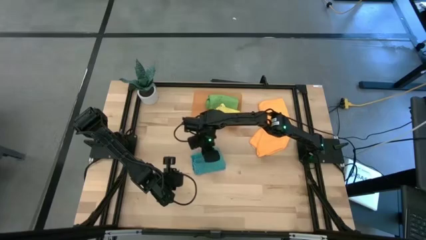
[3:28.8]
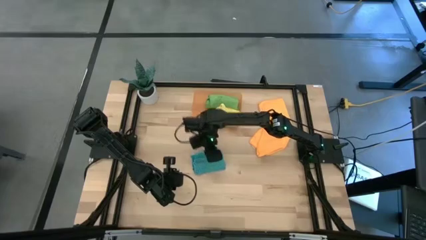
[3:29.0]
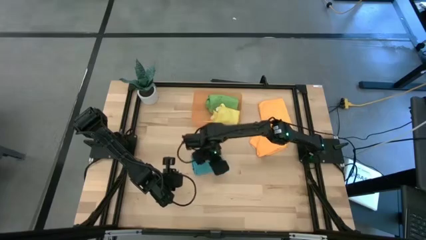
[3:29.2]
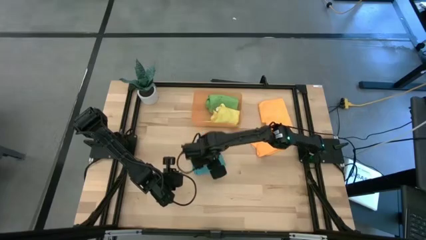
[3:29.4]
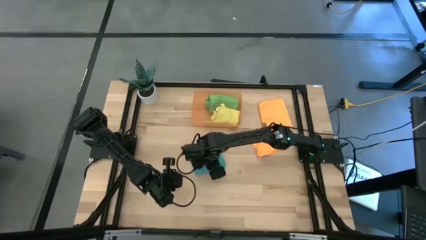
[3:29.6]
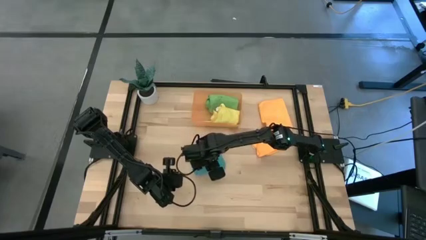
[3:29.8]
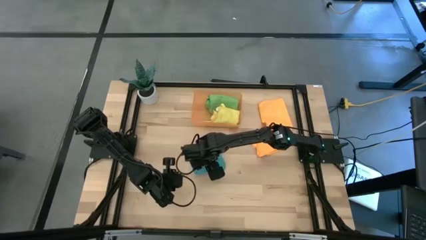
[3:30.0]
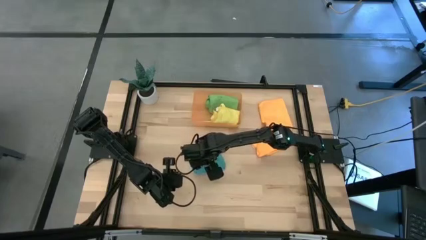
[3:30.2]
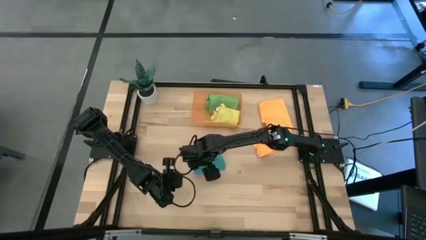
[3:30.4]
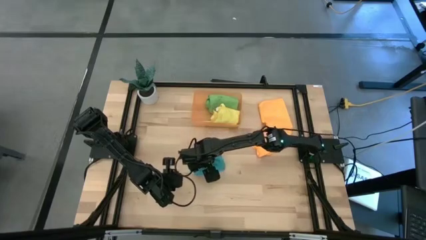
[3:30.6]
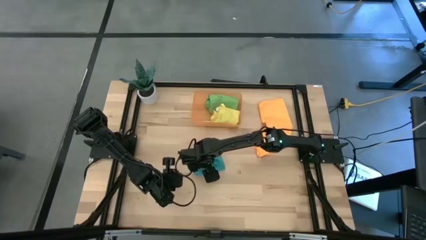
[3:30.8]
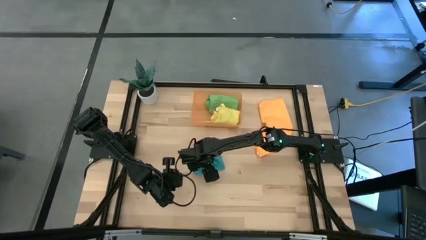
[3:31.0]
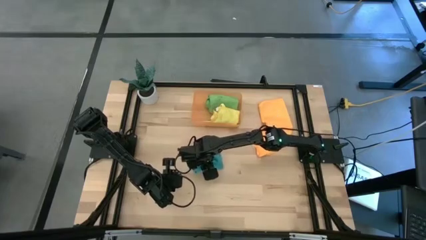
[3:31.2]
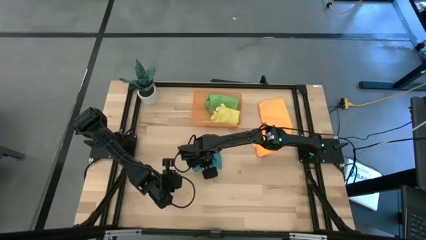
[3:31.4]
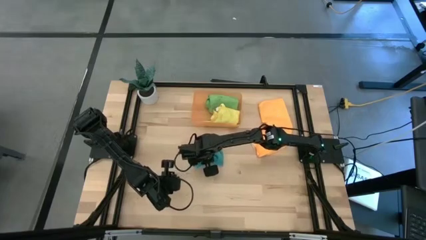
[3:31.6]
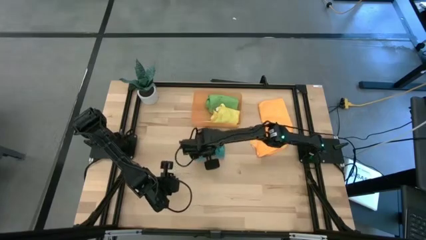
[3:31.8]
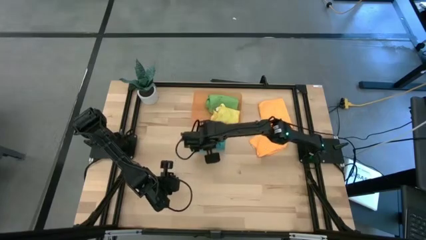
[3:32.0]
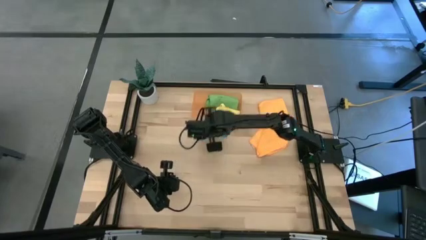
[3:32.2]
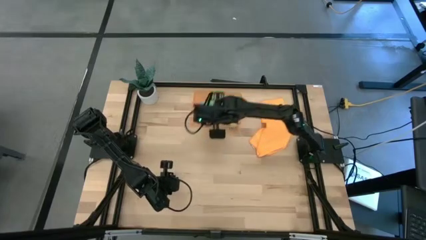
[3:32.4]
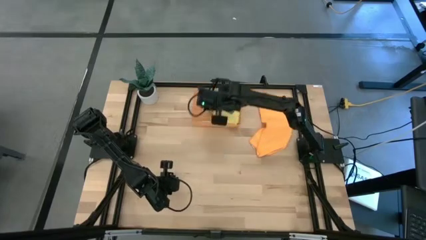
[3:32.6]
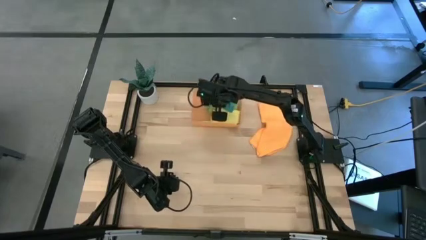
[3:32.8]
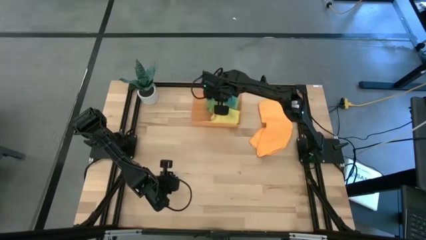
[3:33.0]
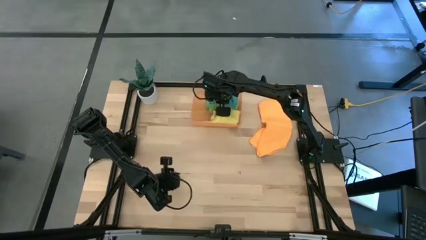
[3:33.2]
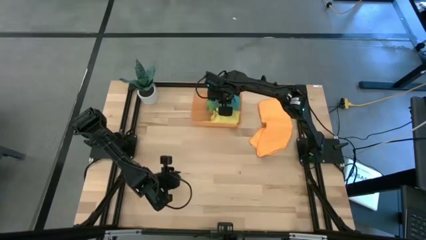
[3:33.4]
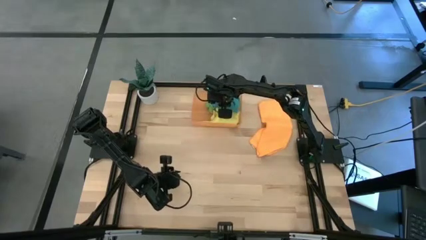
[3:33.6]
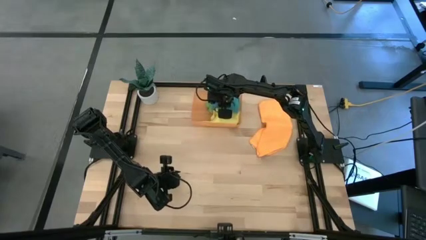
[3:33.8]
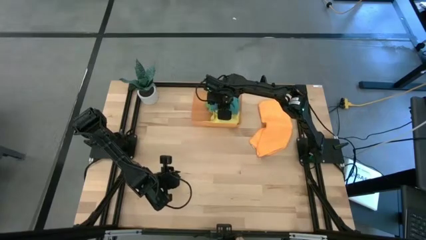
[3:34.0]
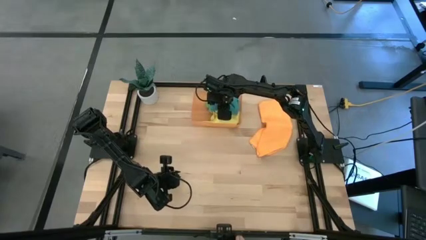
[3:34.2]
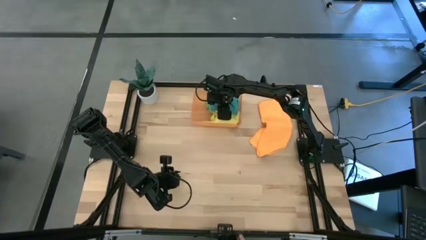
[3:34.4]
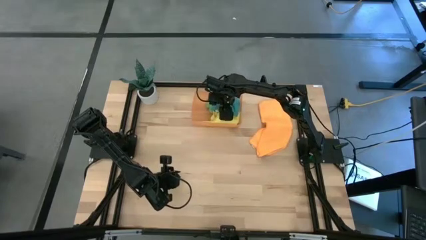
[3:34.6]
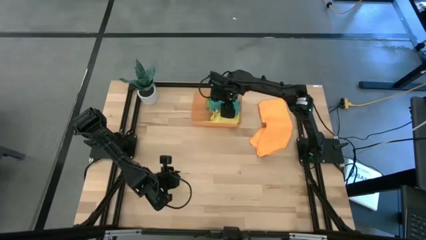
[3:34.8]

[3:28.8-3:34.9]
Task: Roll microfiber towels into tight, uniform cylinder then place into a basket
Put the rolled blue microfiber cloth into the orange bin

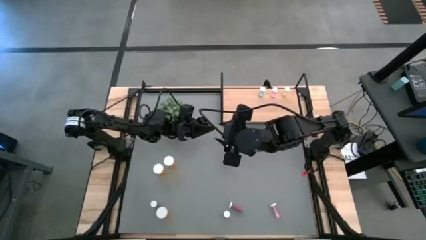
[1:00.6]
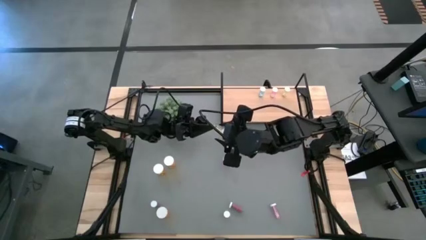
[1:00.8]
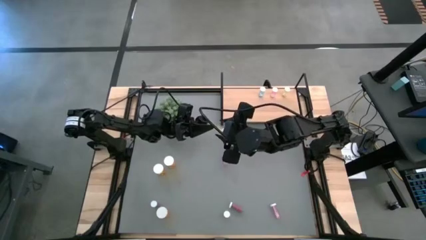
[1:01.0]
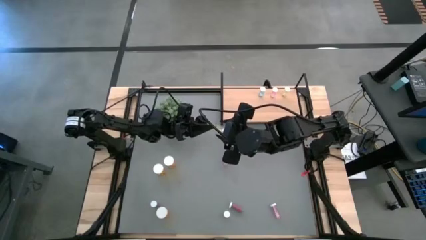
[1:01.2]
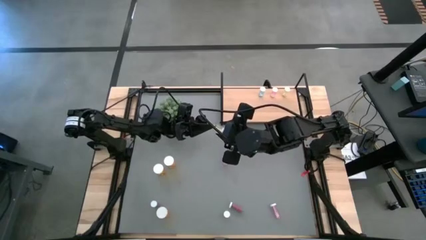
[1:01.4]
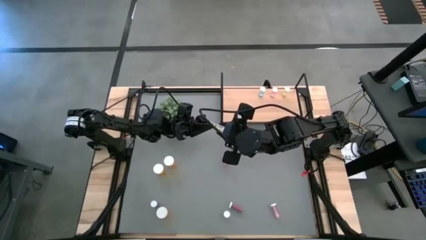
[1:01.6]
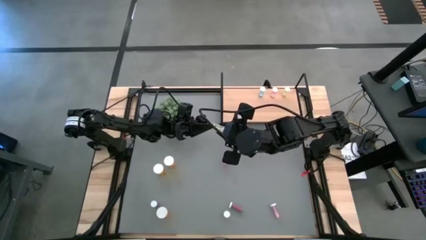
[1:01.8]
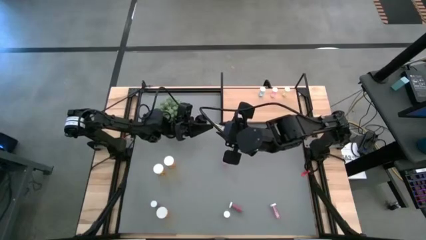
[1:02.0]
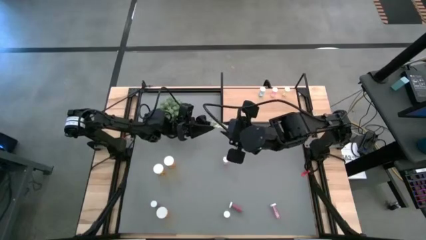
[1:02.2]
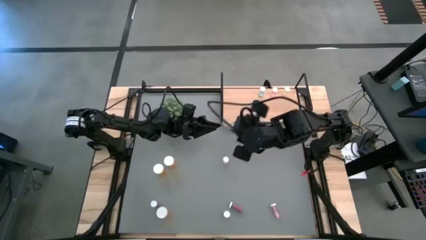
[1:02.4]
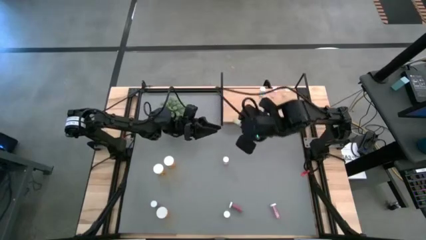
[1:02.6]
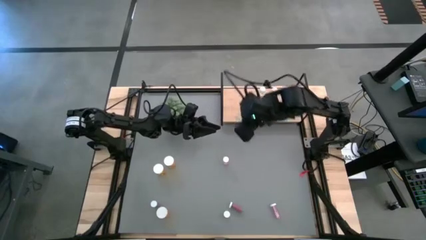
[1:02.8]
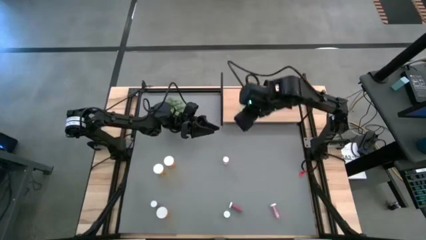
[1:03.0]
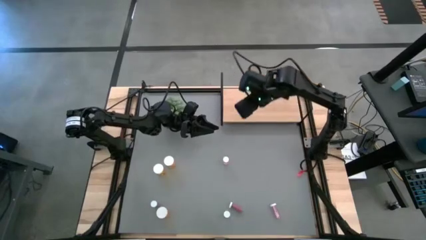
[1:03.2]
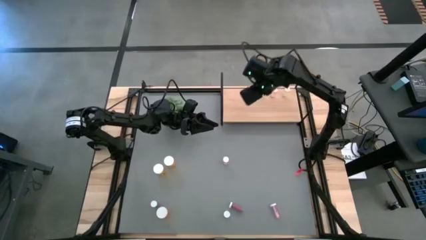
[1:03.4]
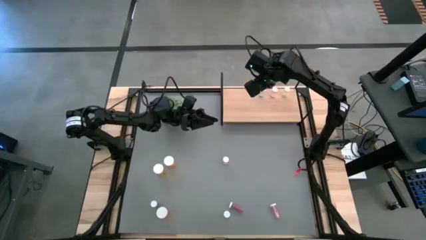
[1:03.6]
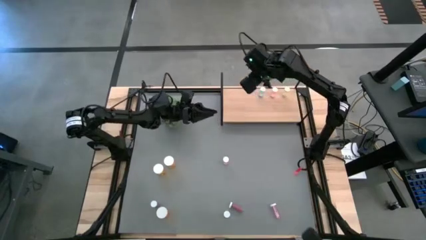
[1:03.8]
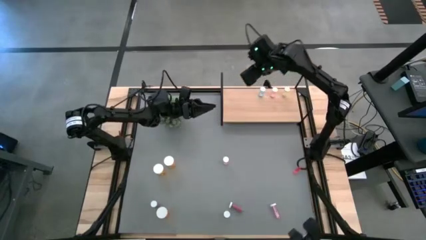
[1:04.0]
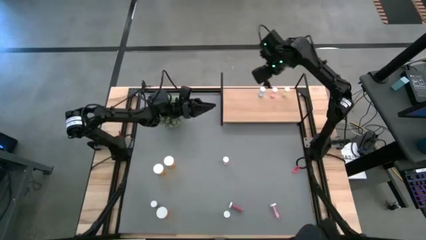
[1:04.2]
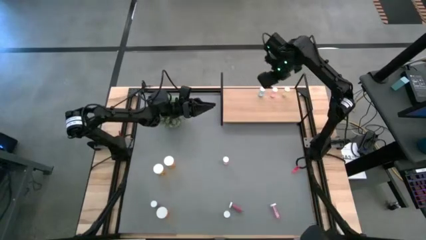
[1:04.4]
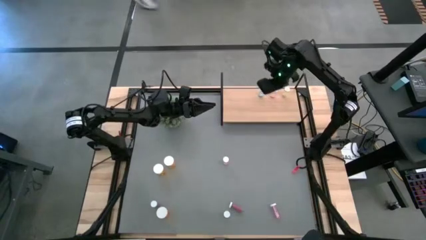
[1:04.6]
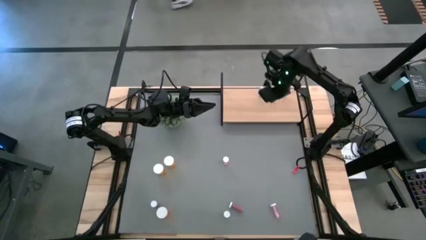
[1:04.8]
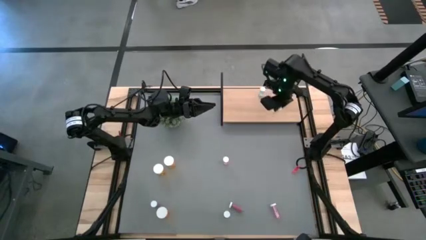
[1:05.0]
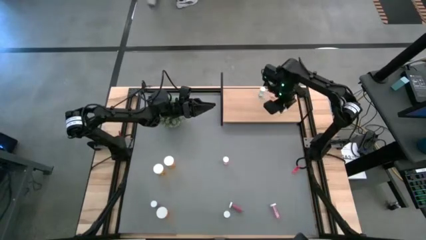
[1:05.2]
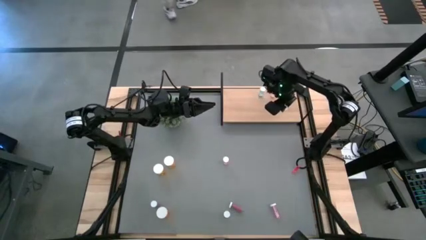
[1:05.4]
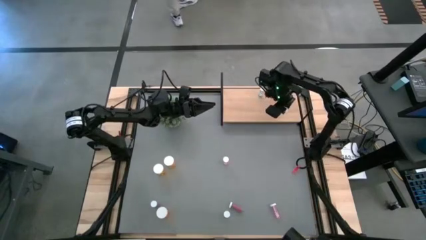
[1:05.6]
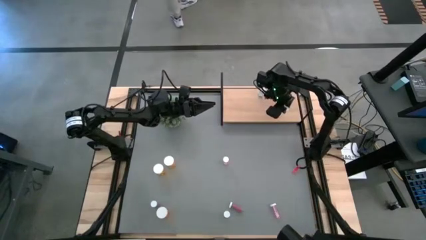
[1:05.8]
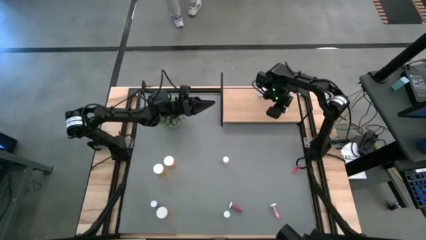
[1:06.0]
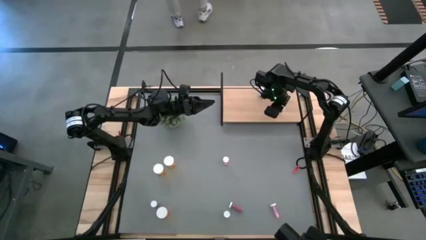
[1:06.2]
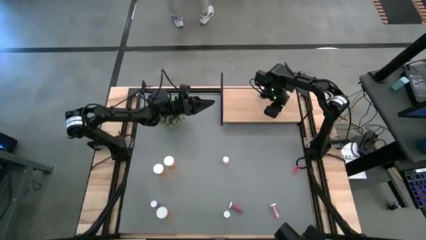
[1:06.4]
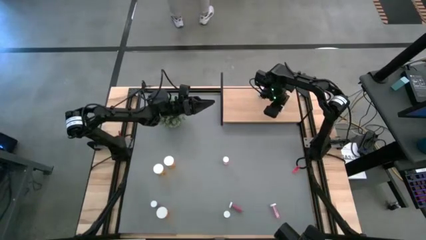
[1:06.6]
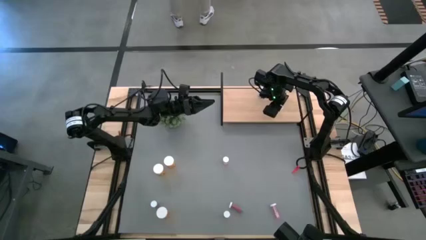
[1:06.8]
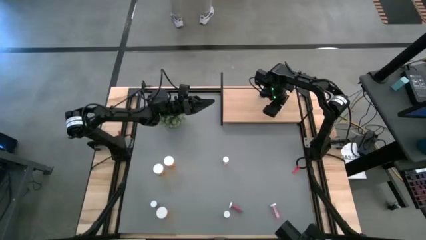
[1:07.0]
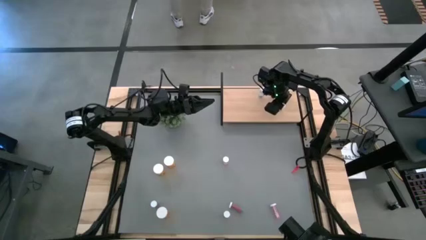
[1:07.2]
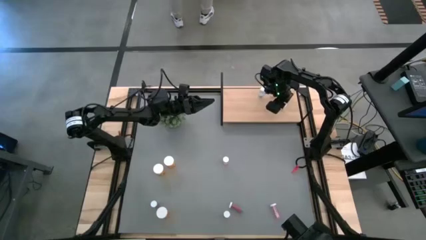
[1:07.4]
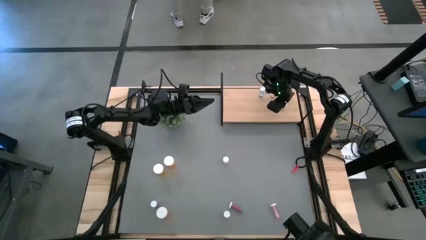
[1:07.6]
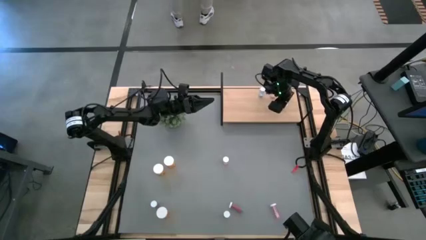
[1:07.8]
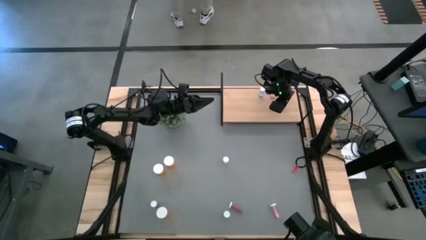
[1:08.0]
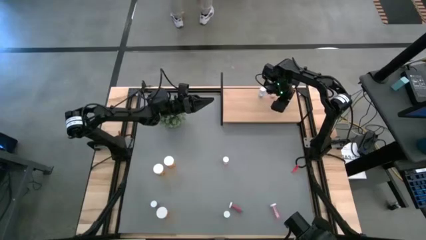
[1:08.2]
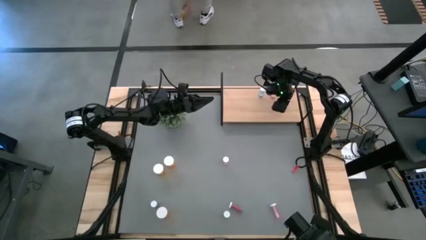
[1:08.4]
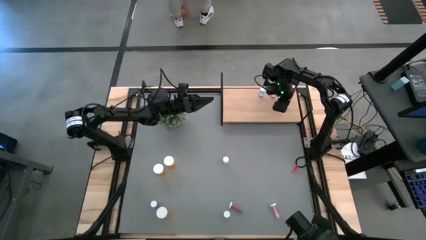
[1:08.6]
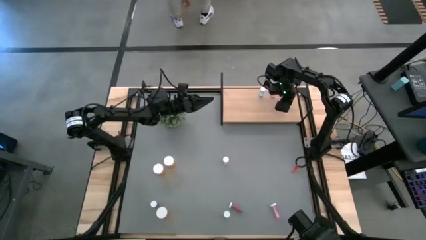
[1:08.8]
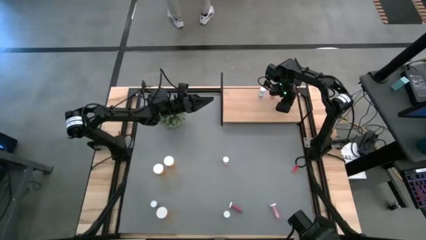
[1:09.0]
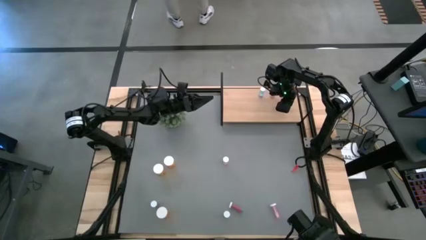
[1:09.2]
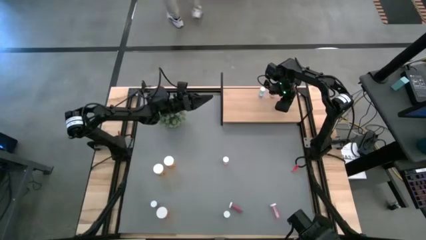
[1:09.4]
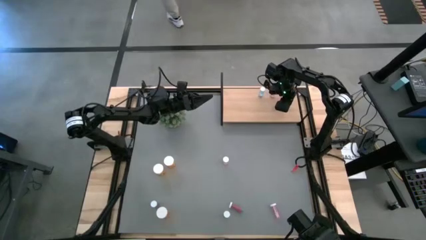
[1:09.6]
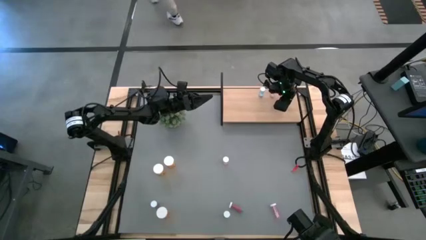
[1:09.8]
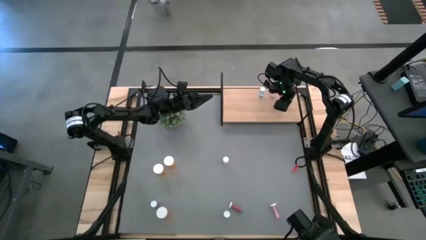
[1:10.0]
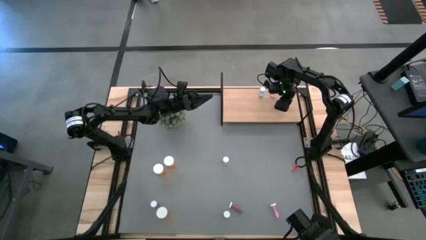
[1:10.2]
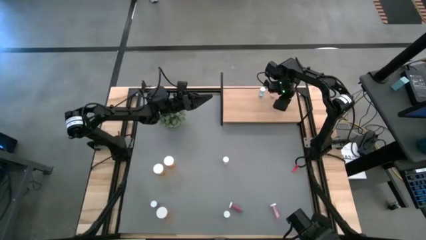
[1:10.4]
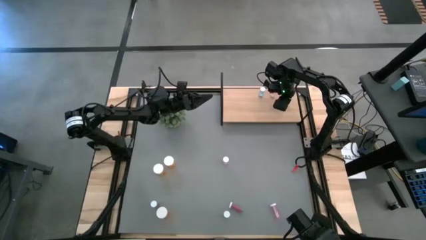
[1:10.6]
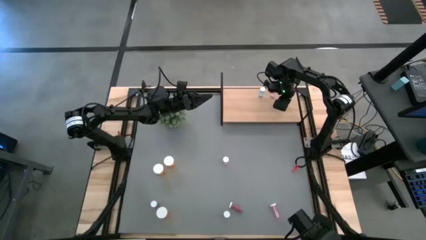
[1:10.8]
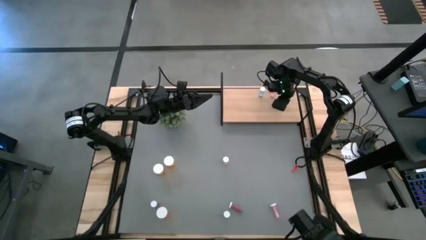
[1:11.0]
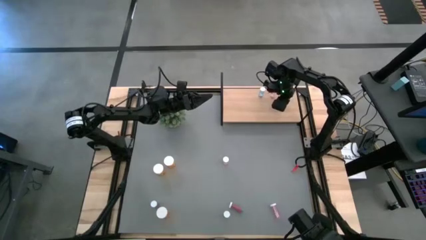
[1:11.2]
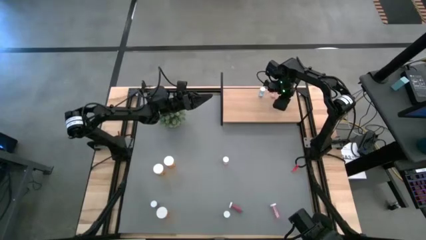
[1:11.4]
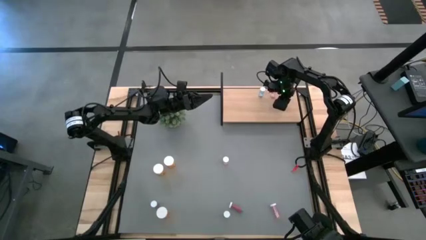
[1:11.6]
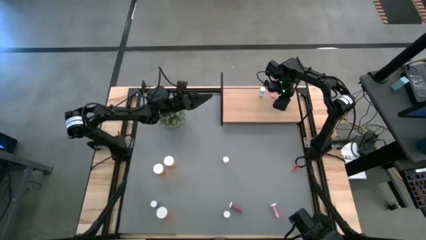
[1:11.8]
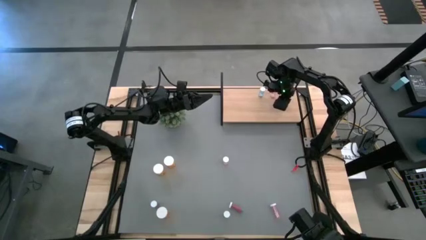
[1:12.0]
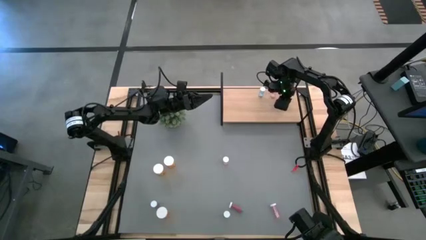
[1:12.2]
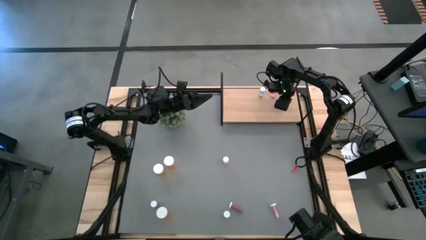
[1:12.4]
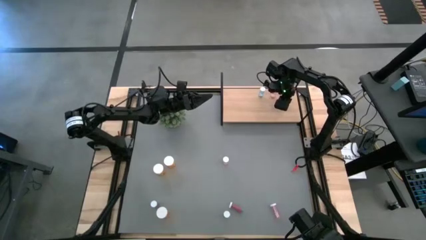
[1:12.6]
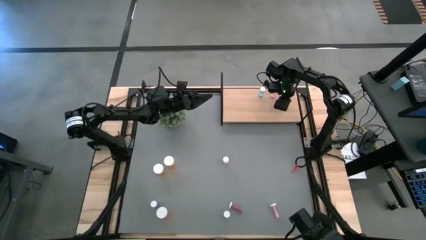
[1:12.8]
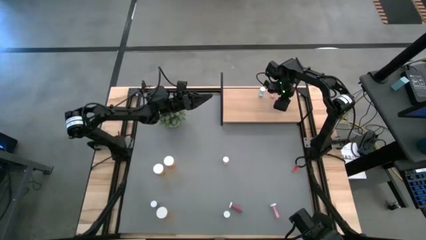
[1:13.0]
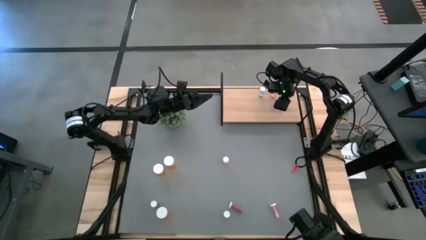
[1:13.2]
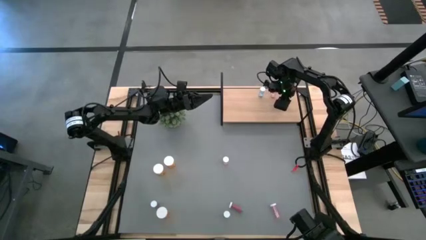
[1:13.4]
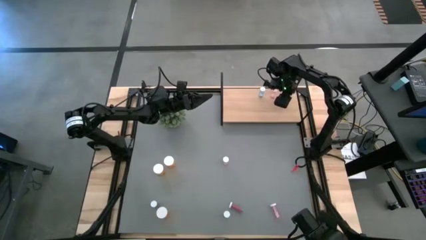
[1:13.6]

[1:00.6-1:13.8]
Task: Pick and place medicine bottles onto shelf by color
Put the top yellow pill bottle on the shelf aligned with the other yellow pill bottle
